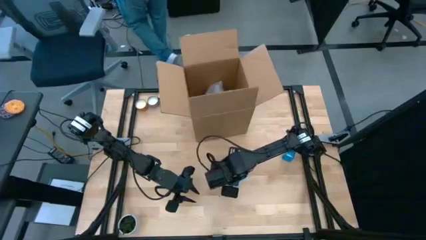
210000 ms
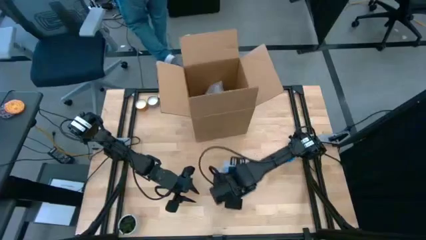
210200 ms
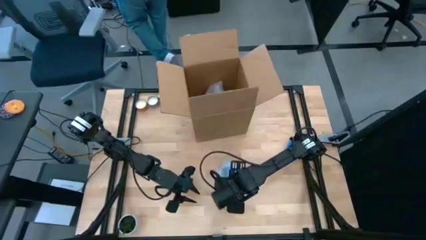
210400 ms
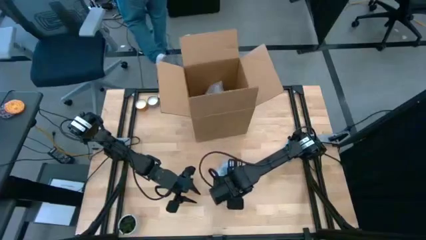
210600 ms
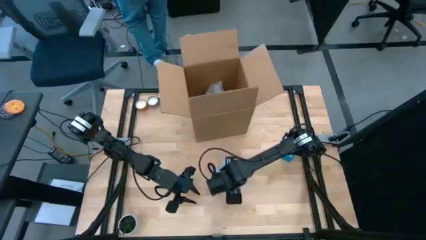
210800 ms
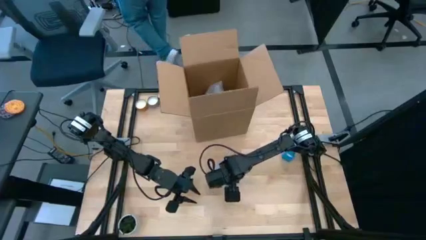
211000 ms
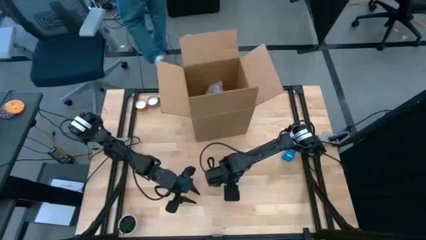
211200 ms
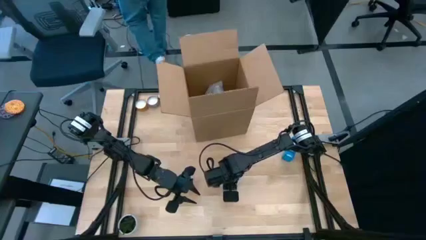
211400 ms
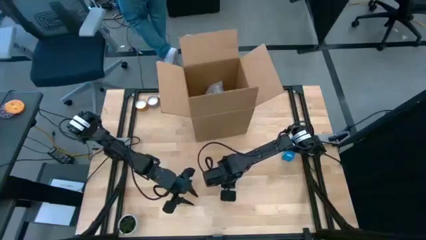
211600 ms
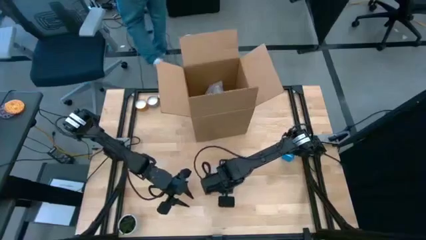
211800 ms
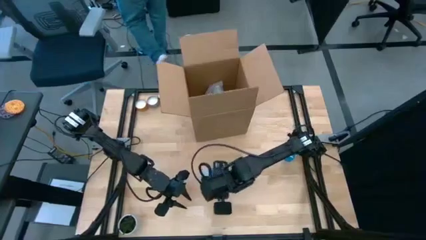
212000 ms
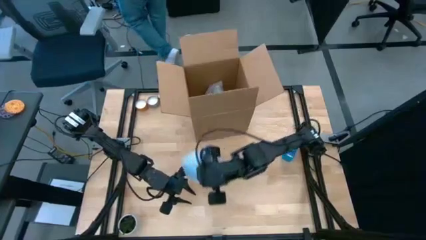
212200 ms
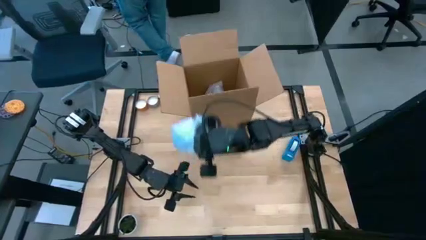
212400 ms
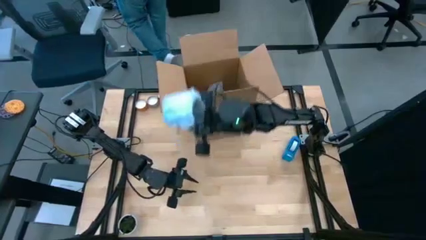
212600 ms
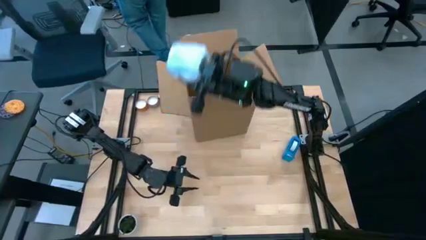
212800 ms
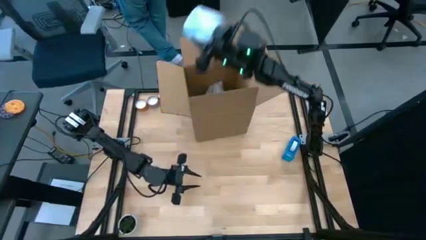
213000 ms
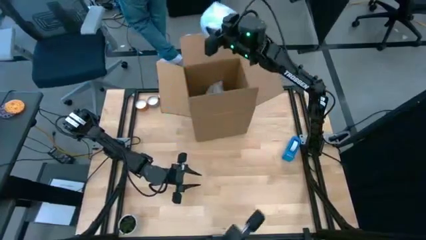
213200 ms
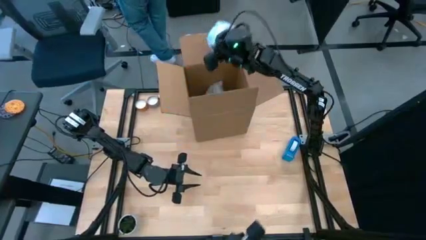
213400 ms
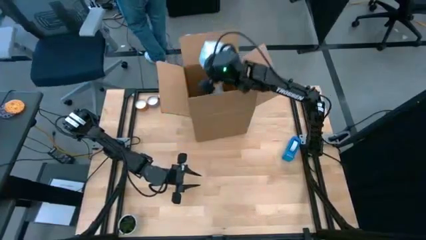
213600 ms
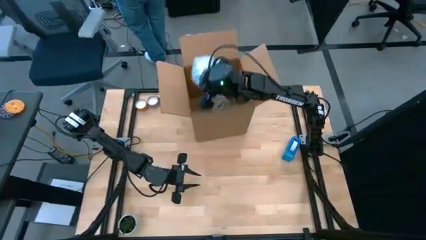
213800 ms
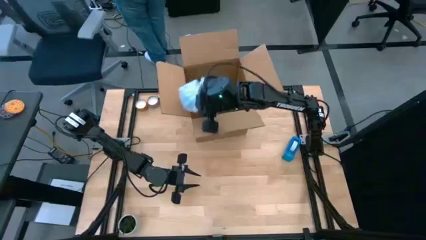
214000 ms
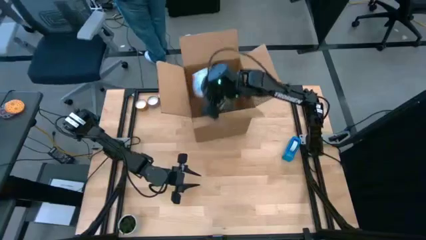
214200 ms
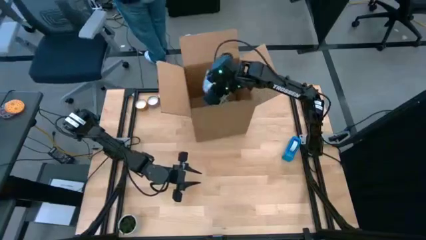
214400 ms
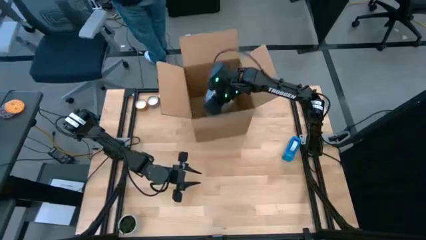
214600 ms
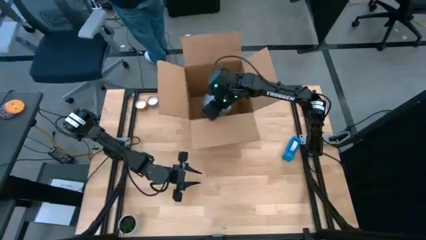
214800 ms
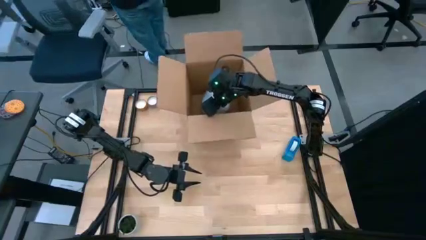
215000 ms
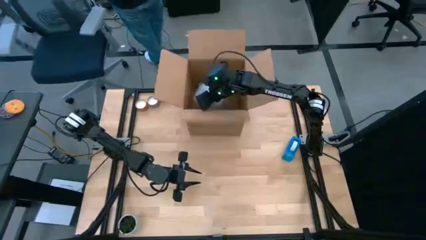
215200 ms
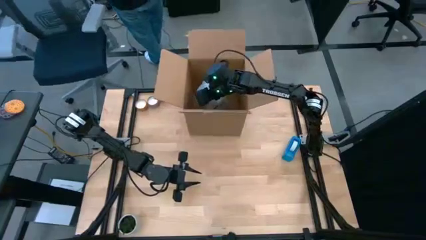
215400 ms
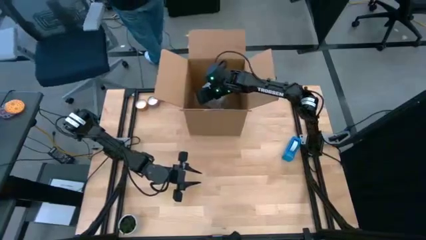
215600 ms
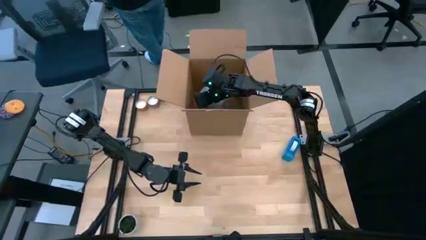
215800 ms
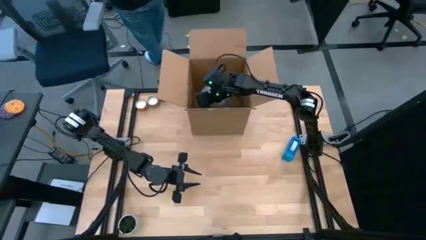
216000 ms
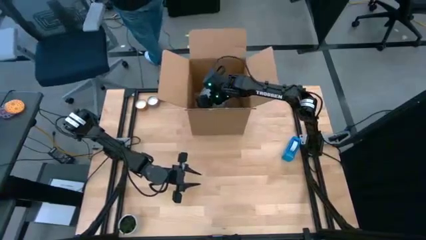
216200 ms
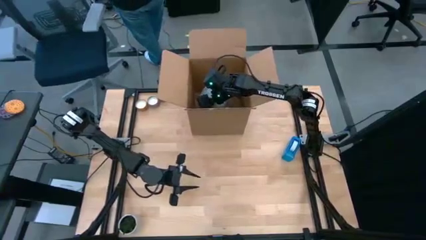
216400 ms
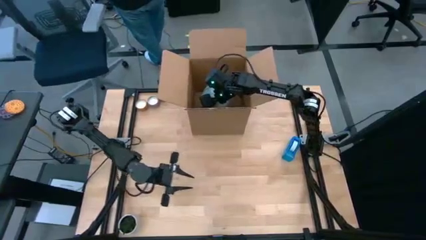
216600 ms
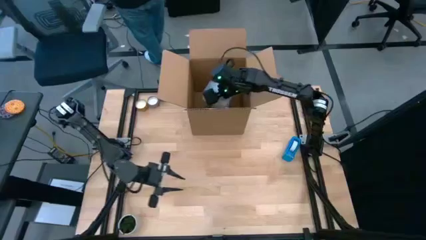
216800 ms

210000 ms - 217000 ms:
Task: wrap mug
Put the wrapped blue cup into the cardboard box

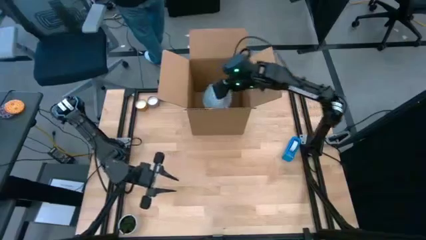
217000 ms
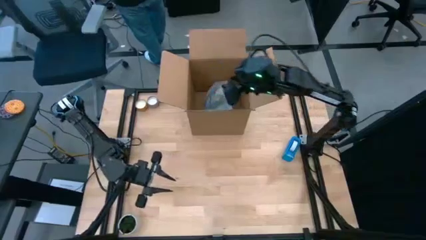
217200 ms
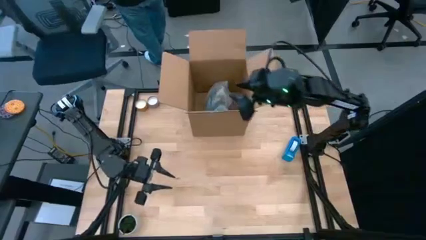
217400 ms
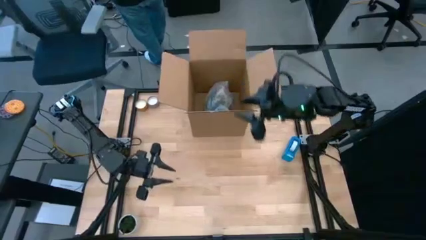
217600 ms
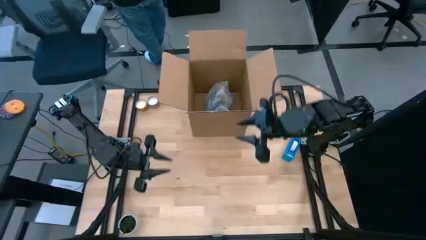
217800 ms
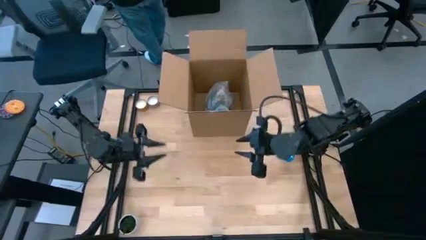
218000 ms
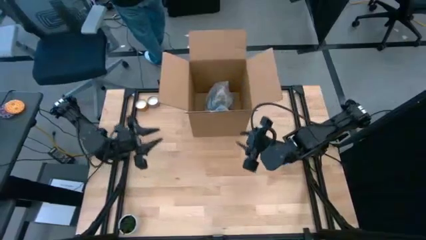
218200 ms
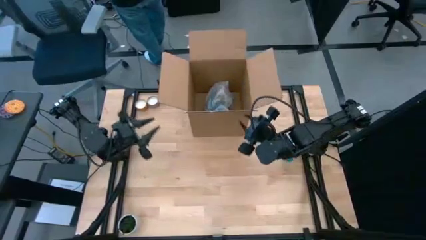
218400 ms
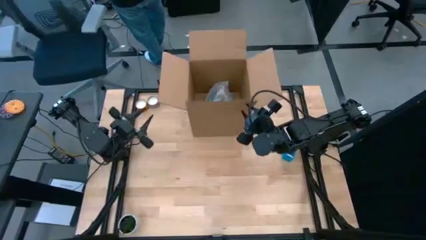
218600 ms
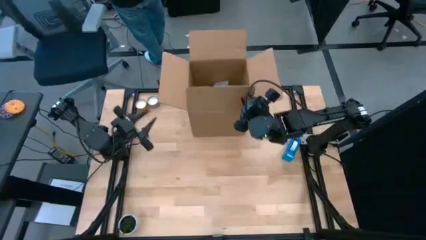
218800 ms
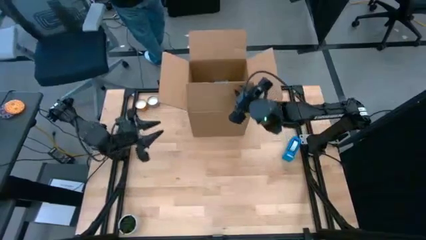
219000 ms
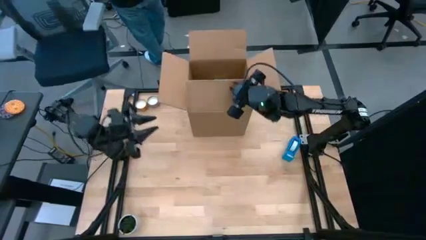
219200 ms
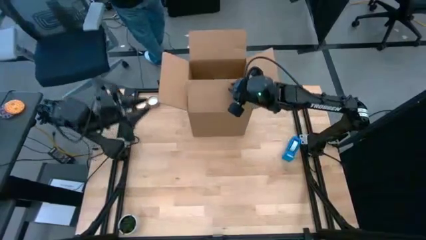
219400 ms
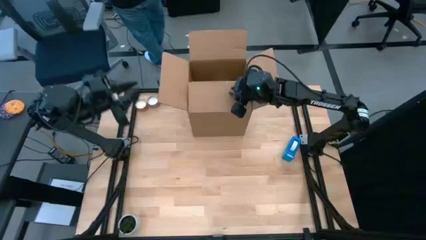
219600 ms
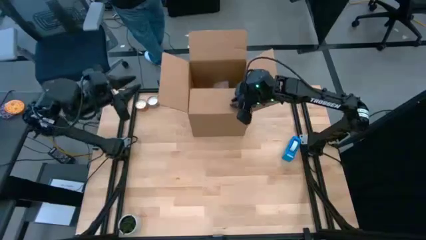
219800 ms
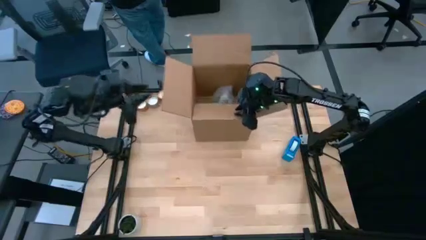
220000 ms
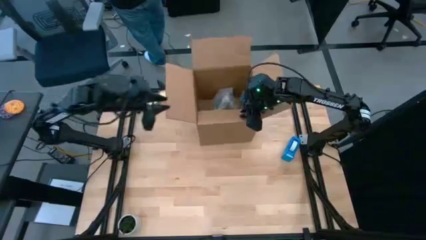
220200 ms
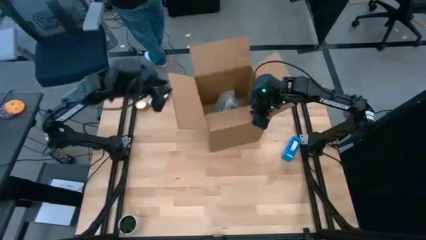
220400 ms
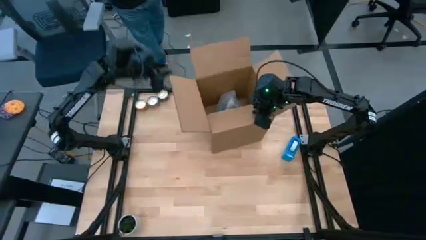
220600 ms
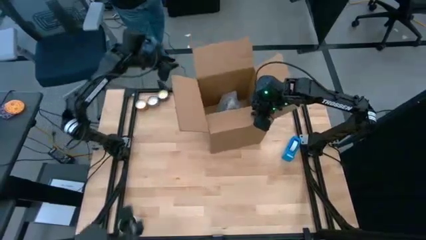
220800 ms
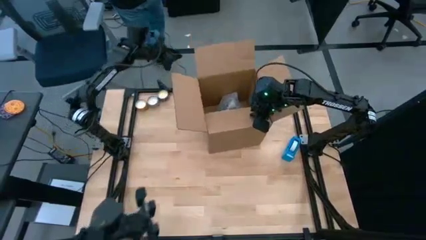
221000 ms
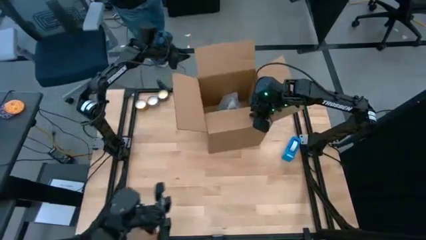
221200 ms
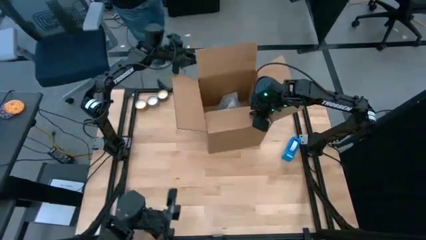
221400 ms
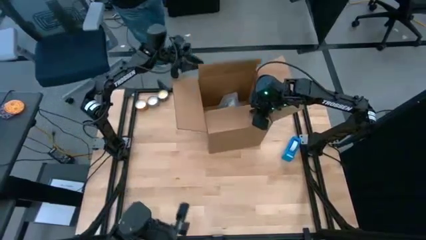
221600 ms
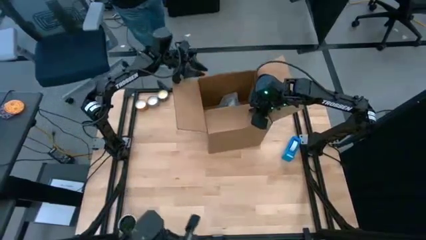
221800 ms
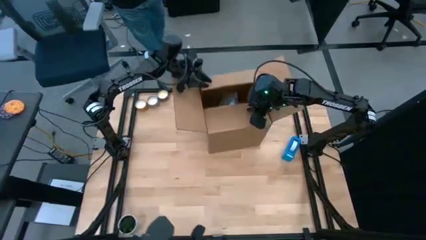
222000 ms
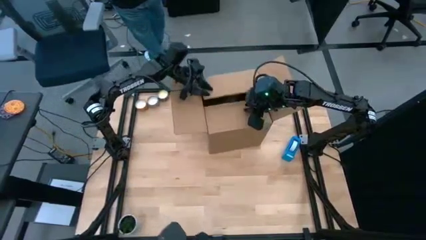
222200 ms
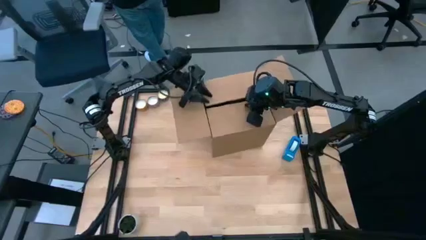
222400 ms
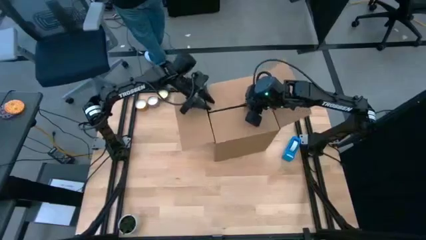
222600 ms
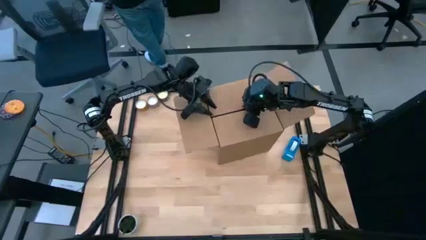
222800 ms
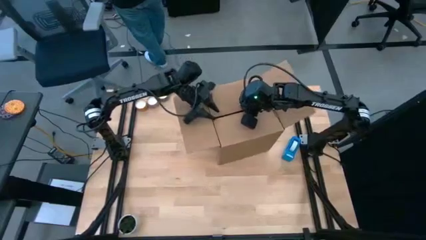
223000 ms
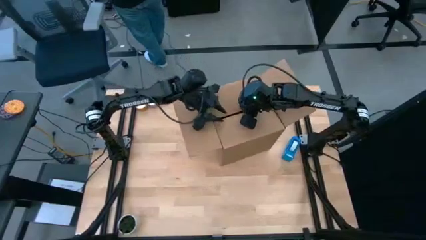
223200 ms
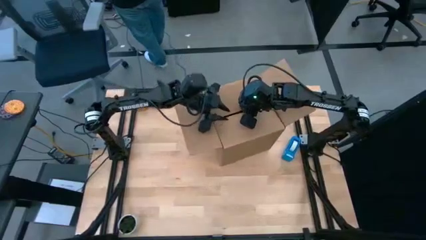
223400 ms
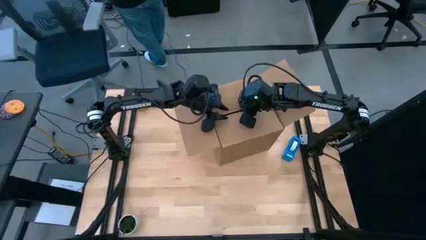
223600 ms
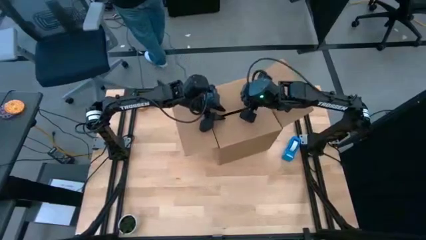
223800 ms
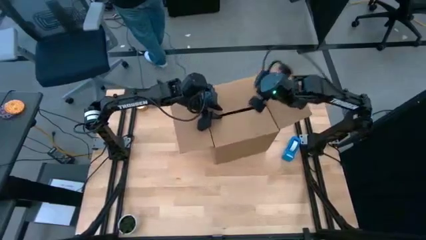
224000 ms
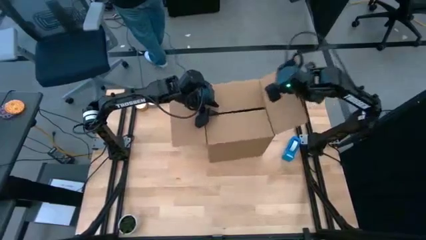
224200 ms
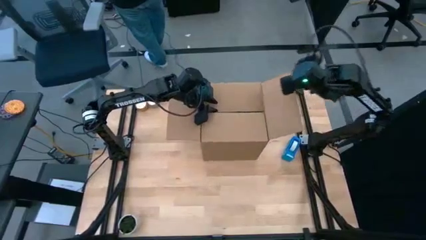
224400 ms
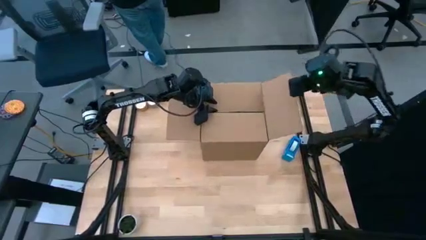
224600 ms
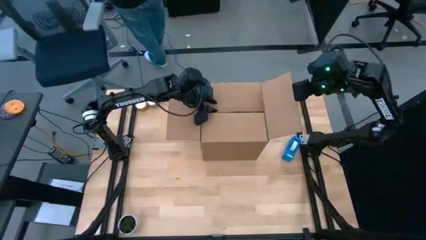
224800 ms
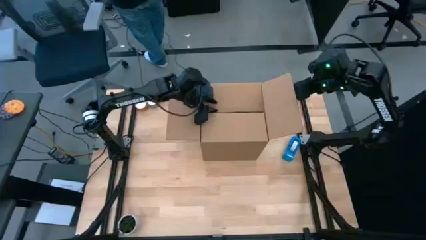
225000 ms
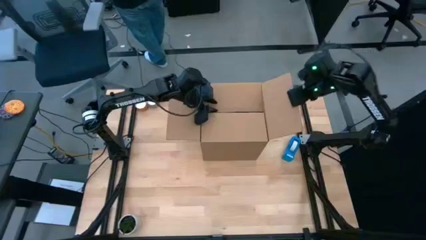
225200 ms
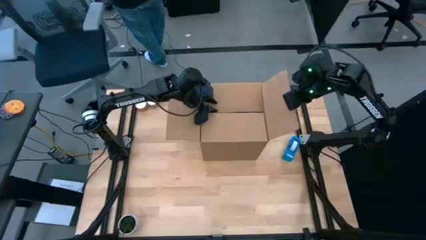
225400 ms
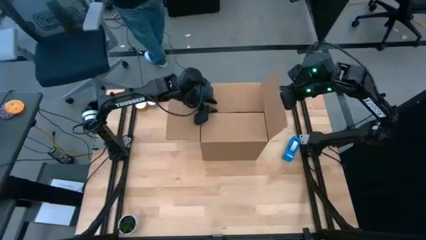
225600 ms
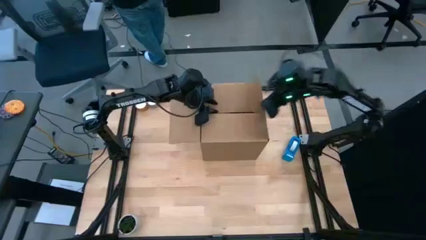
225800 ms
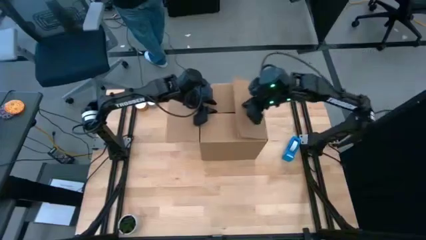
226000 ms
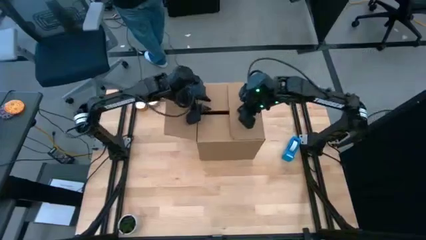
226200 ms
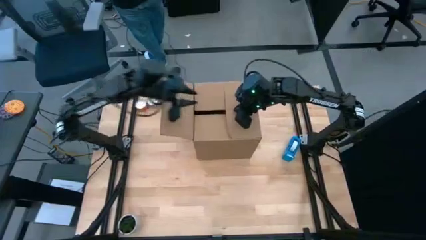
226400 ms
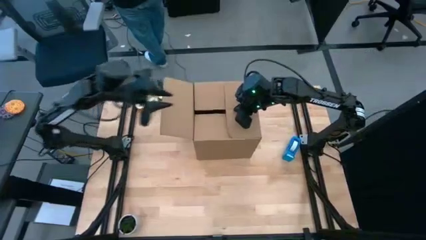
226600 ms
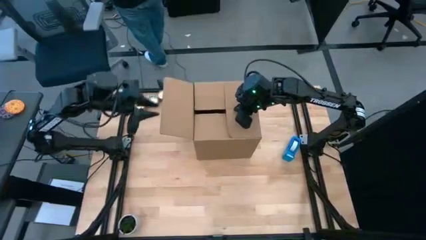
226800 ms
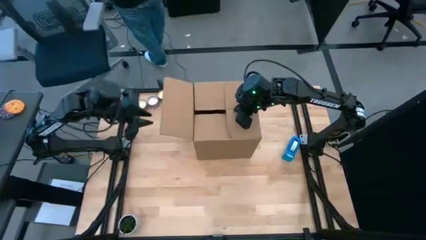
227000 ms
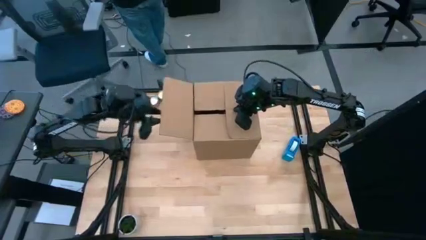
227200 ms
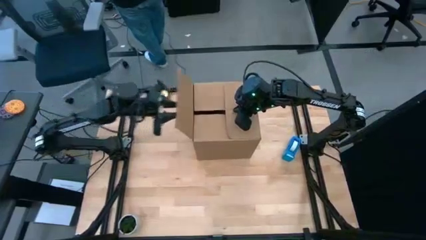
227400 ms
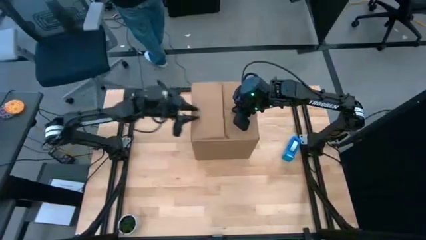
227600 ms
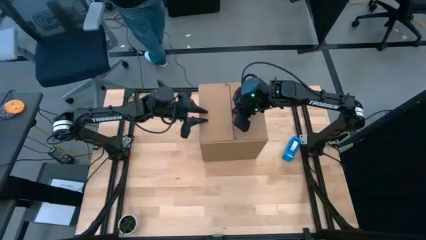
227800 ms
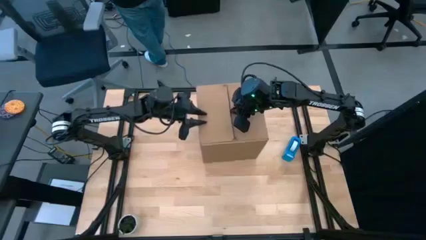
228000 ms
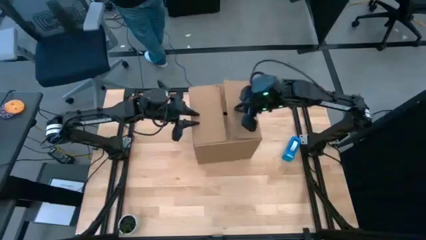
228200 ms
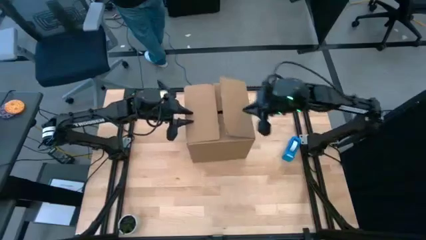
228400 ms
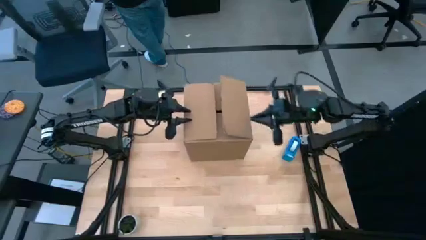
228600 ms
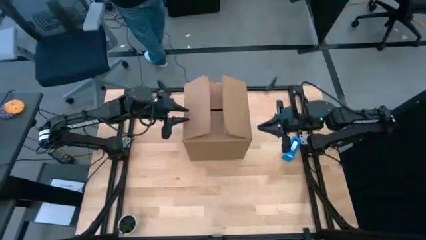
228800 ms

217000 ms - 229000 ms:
Close the cardboard box
